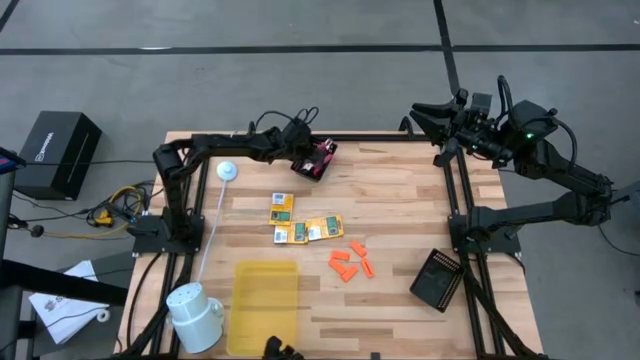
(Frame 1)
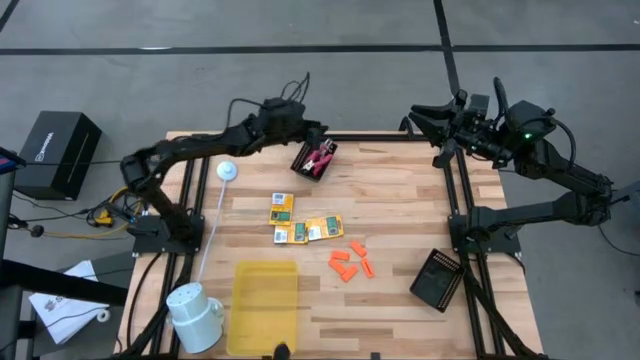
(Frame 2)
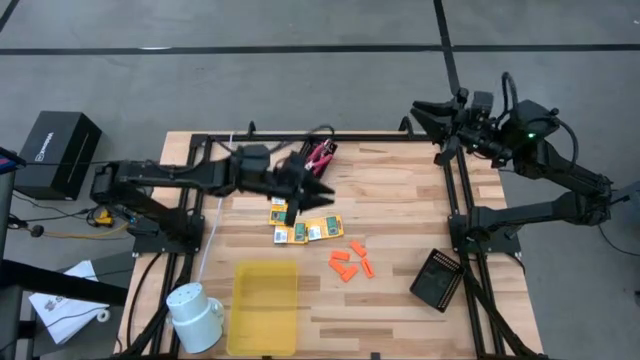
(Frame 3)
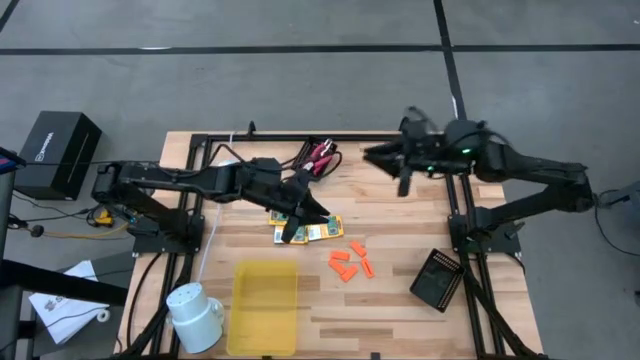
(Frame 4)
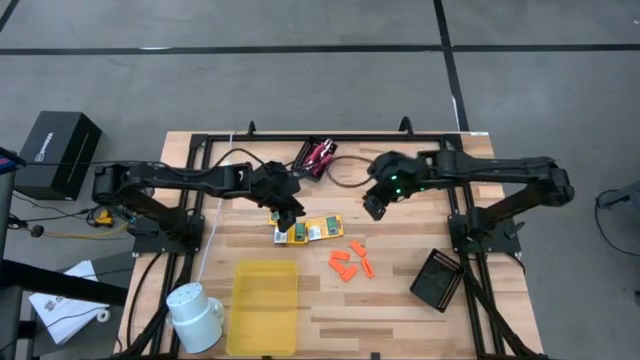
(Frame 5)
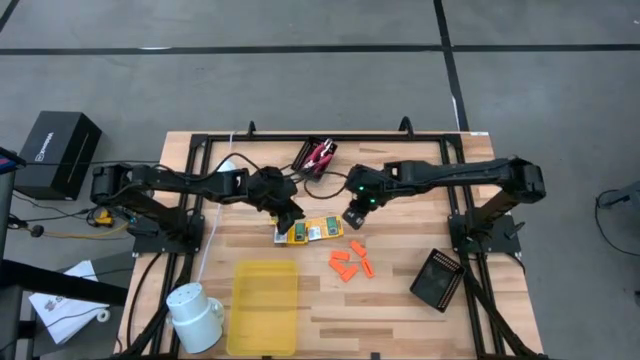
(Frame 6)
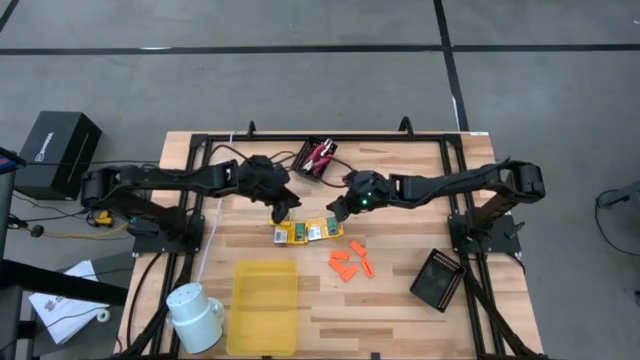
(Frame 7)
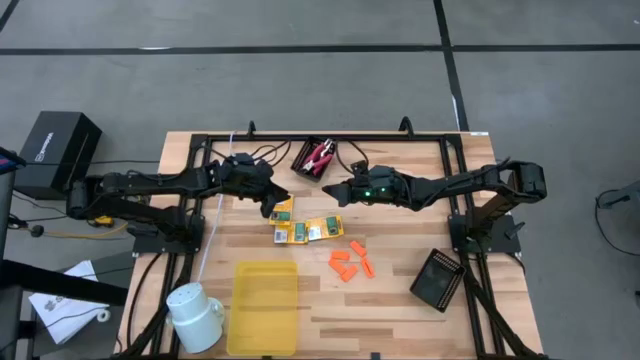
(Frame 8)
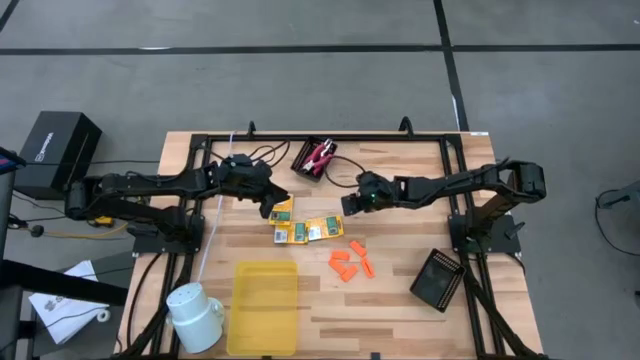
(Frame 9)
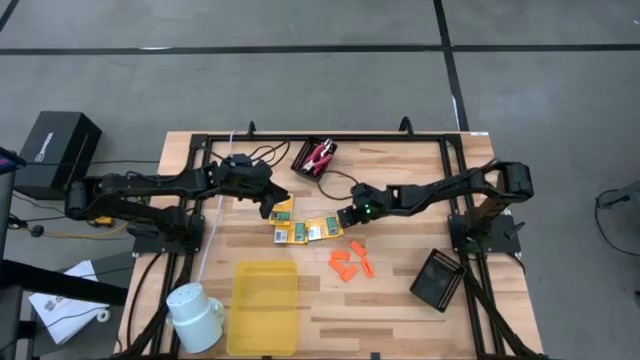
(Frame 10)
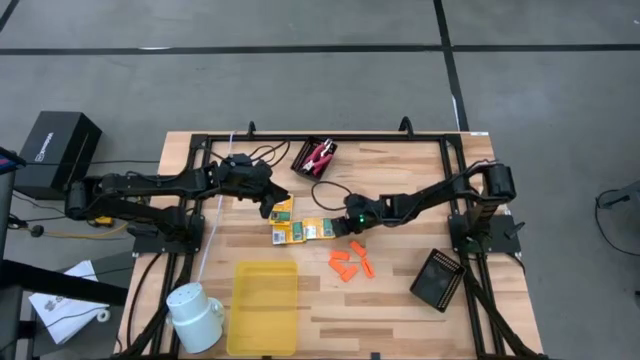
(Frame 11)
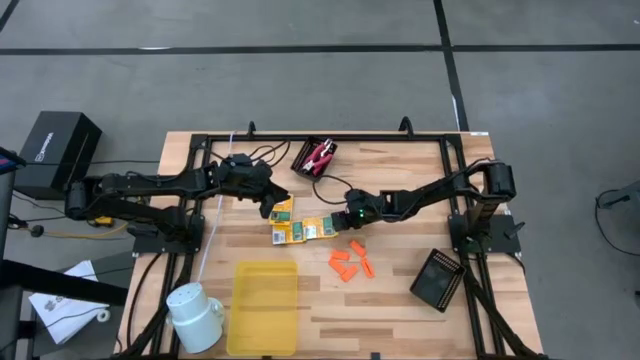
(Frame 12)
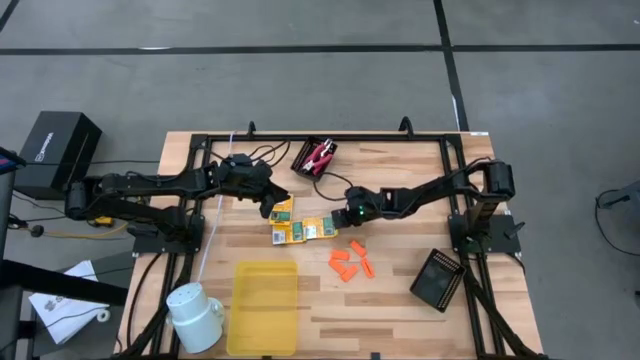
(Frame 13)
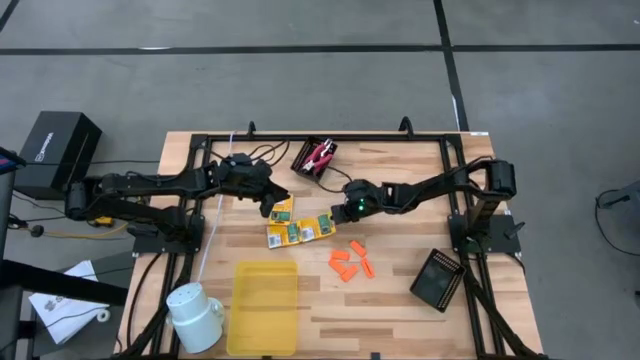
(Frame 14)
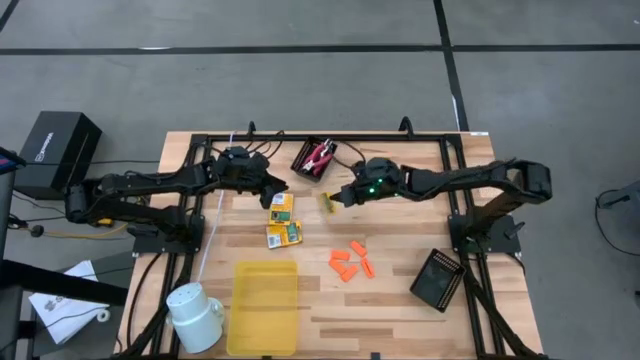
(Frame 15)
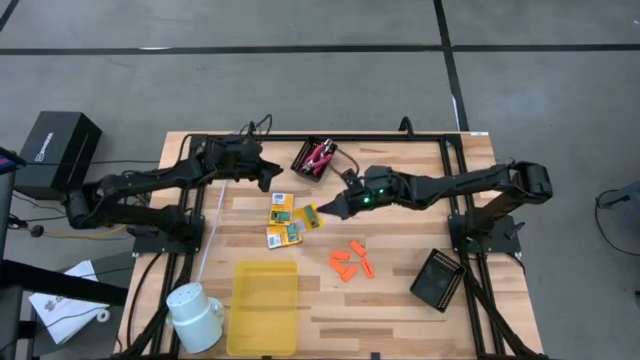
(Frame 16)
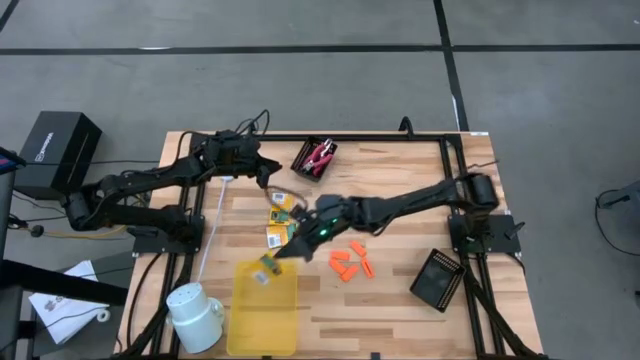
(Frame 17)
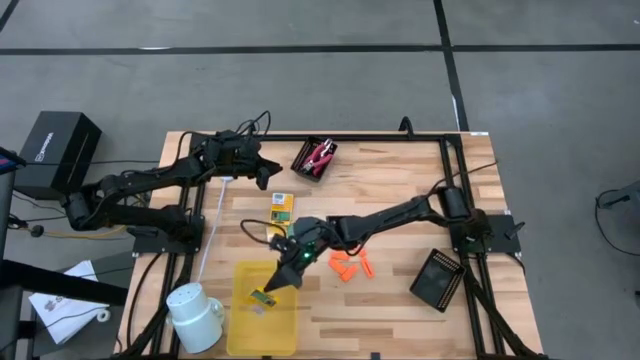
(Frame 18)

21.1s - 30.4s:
Task: Pick & Place School Supplies
Put the yellow crayon box into the yellow bin

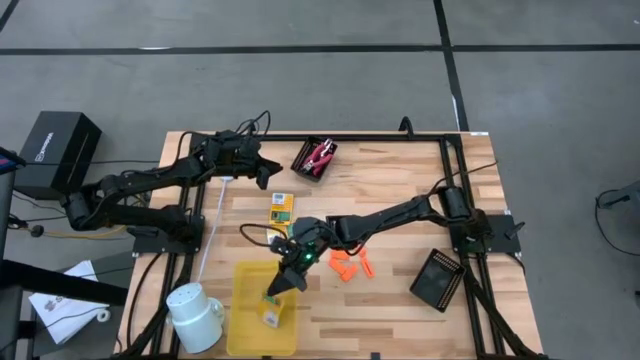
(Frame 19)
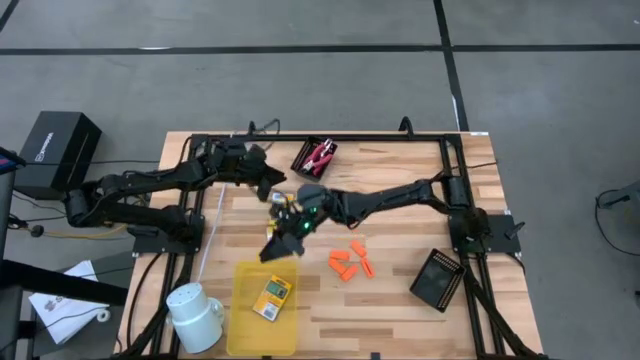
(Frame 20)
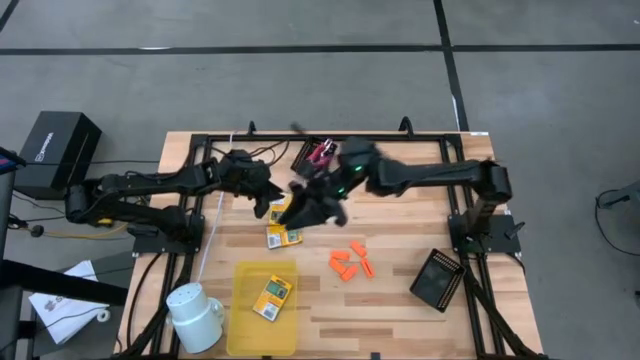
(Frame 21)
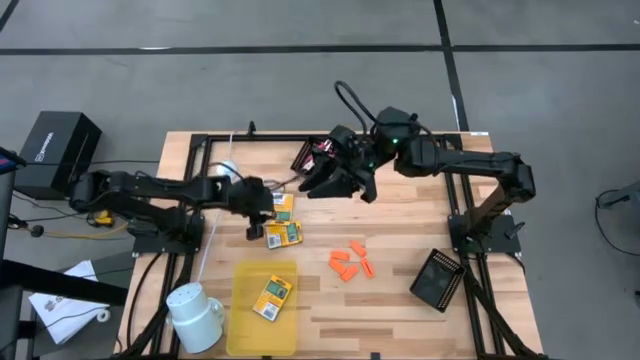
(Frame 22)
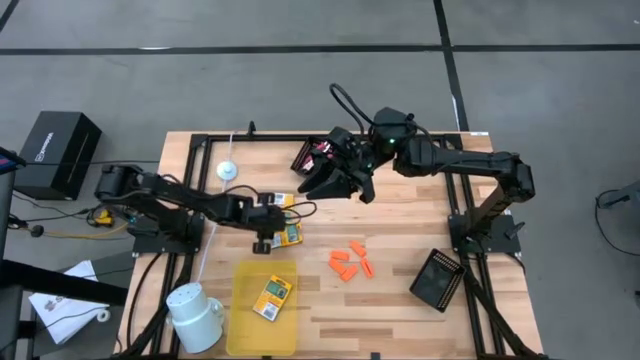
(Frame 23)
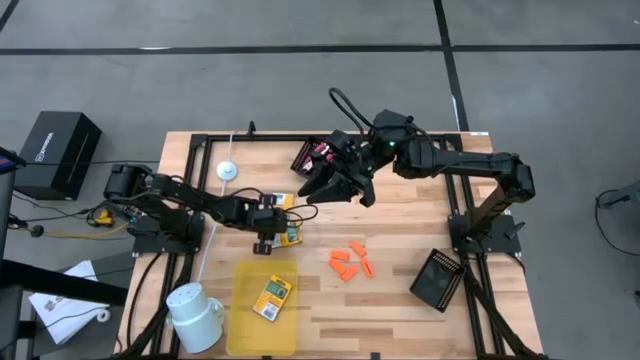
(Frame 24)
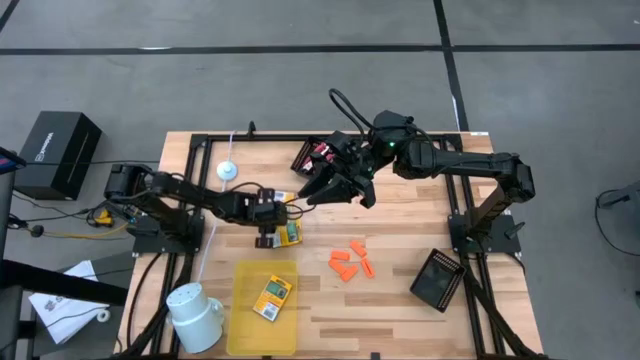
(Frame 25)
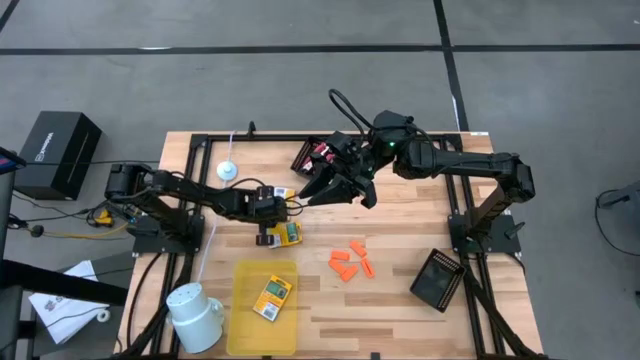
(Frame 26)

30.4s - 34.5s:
Put the top yellow crayon box into the yellow bin

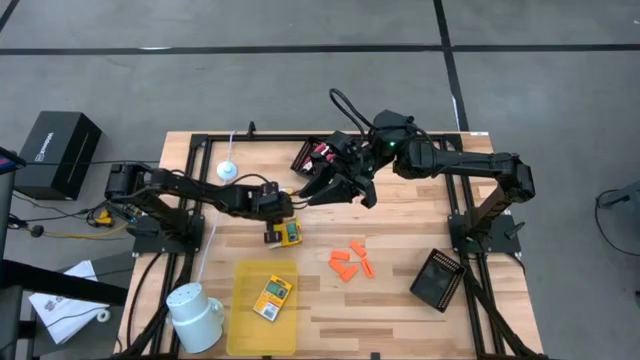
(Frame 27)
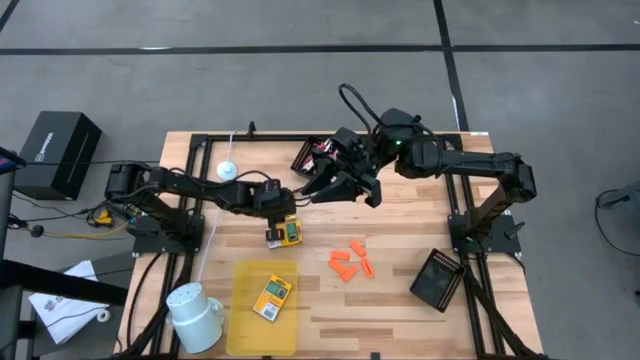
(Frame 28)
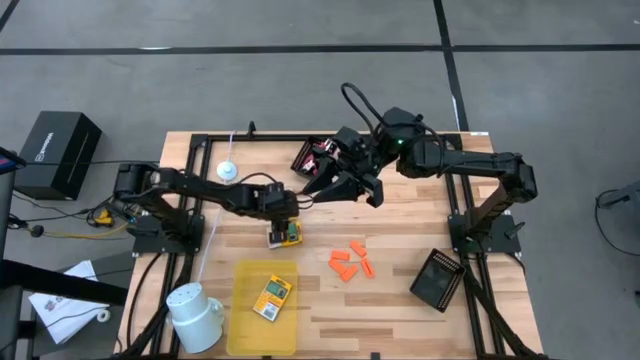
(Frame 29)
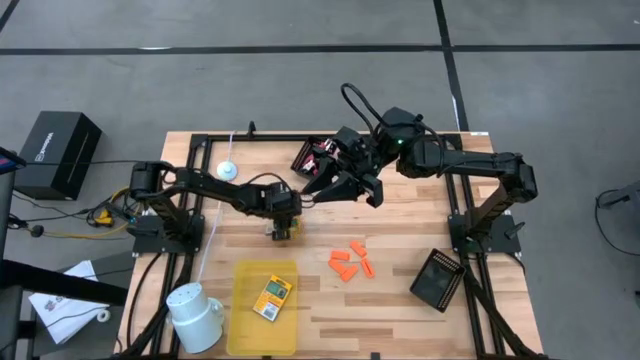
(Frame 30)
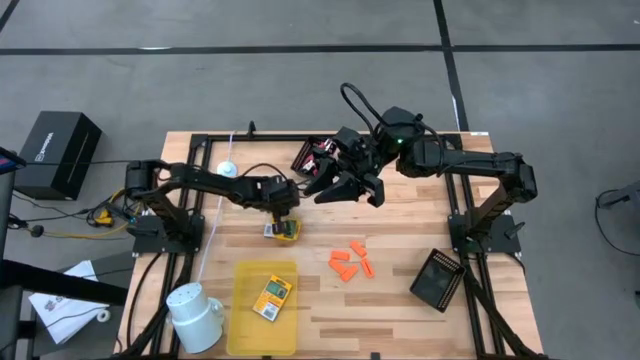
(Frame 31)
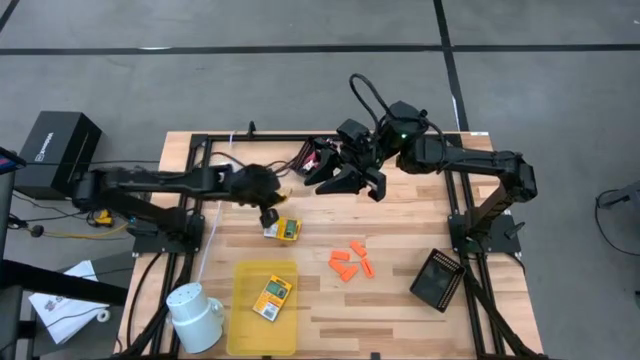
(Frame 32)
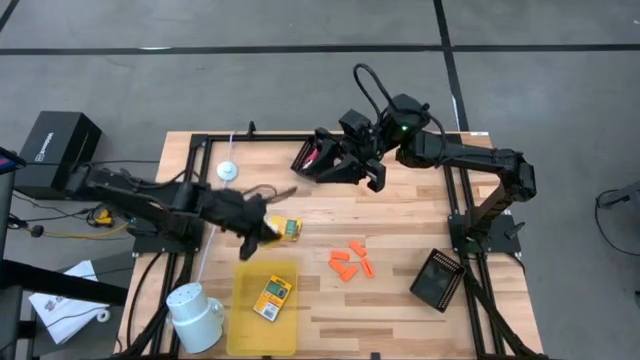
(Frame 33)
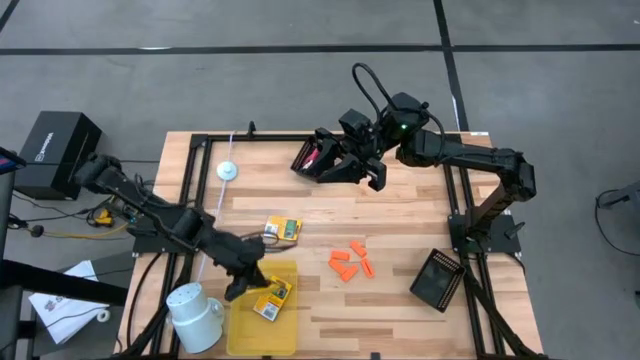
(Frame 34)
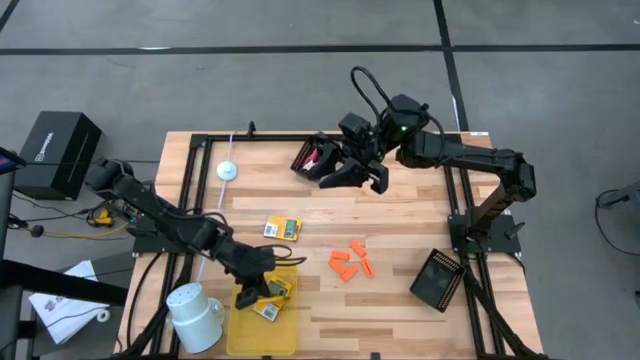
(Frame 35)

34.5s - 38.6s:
Put the top yellow crayon box into the yellow bin

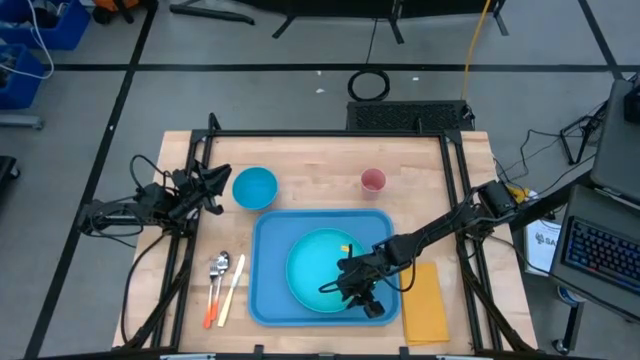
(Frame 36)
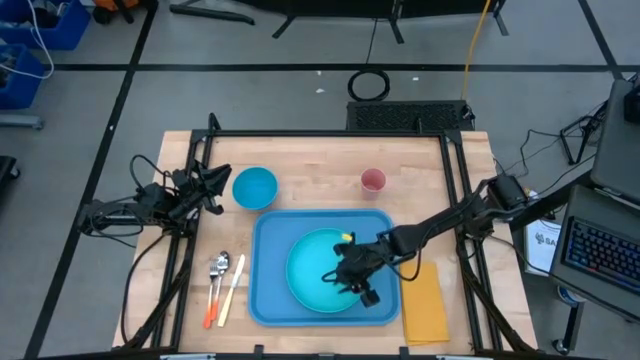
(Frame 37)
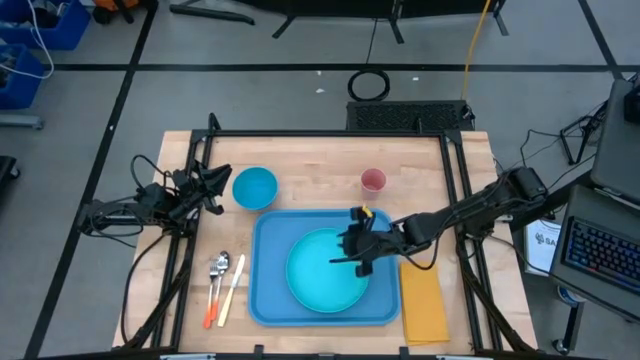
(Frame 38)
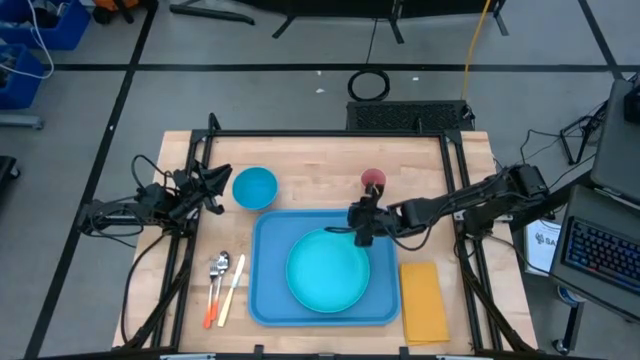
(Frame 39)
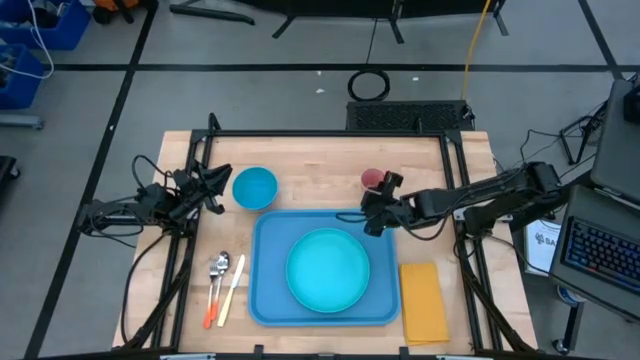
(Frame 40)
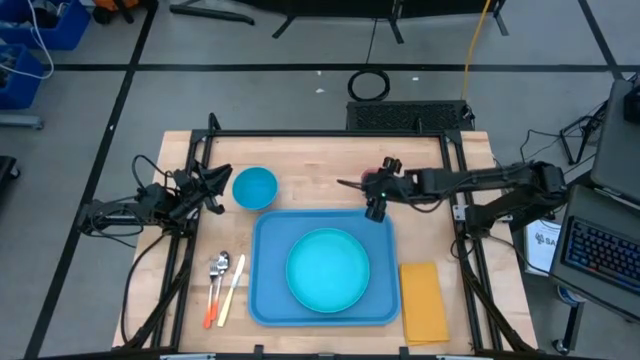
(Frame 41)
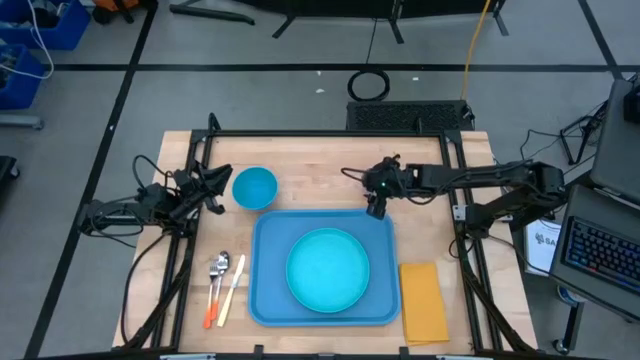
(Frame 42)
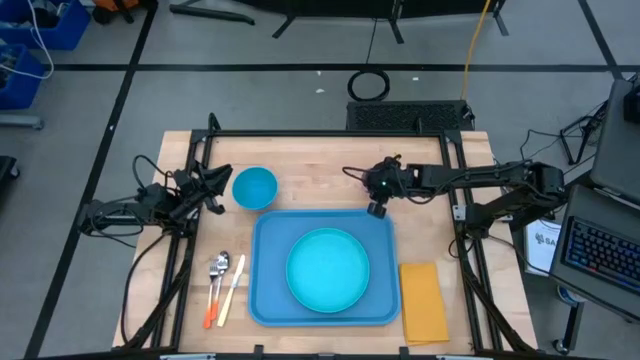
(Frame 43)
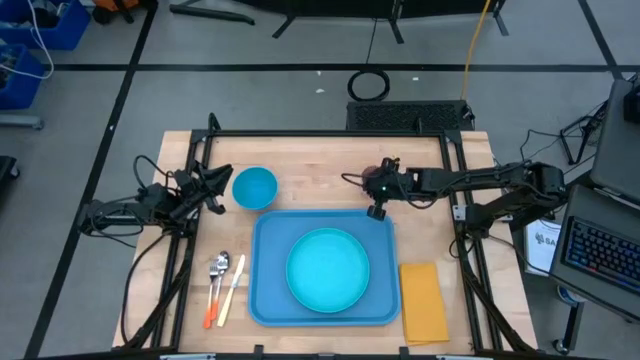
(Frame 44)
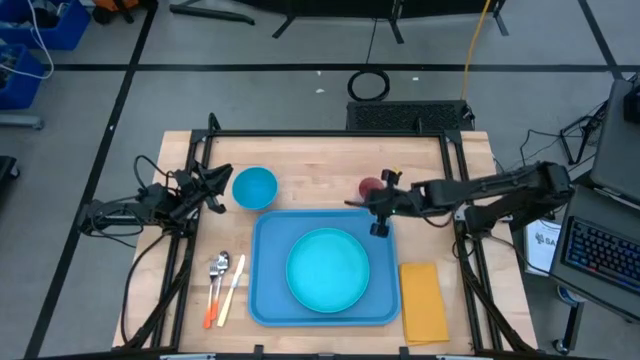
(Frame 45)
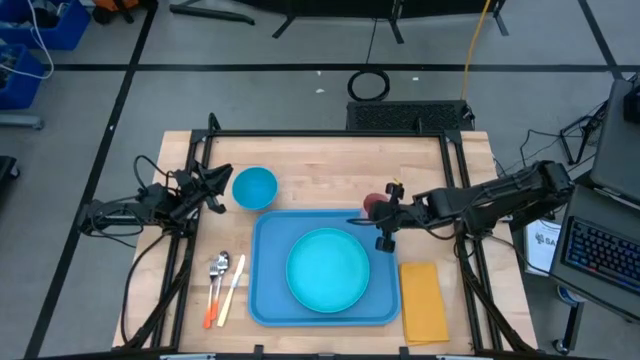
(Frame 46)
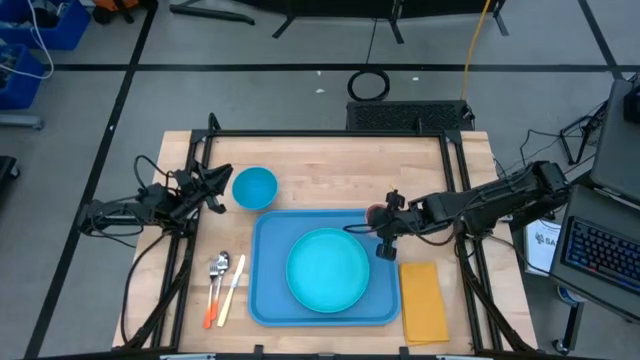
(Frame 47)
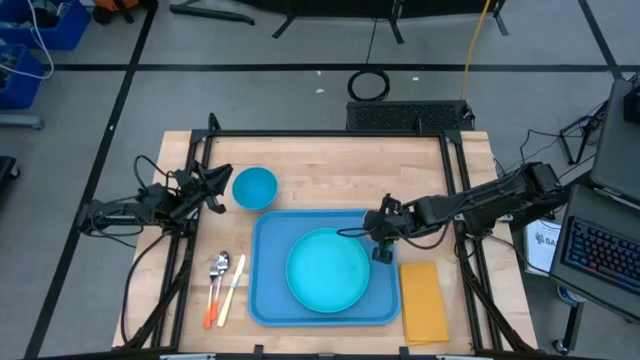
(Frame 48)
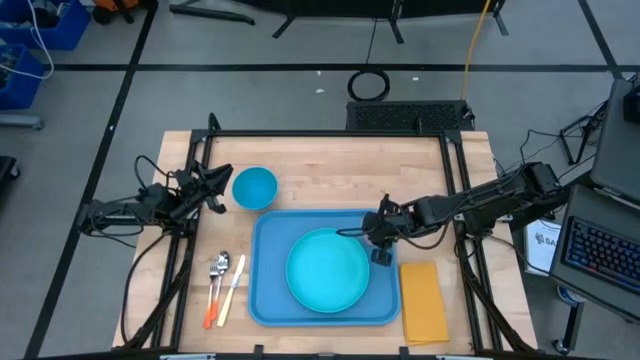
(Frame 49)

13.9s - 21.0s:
Task: Set up tray
Put the pink cup on the top right of the green plate in the blue serving tray
